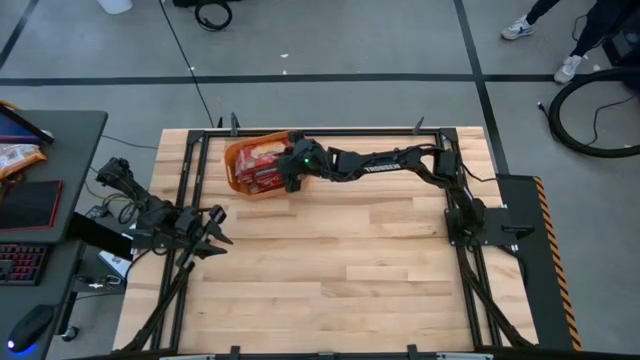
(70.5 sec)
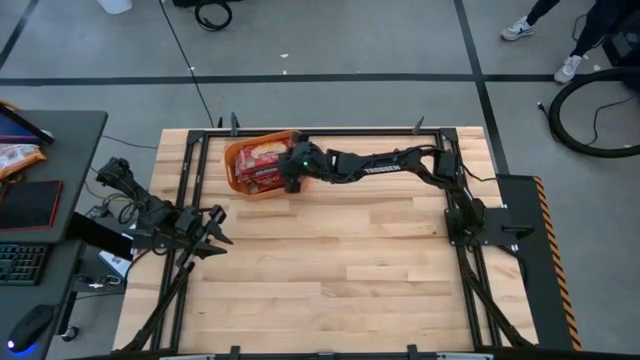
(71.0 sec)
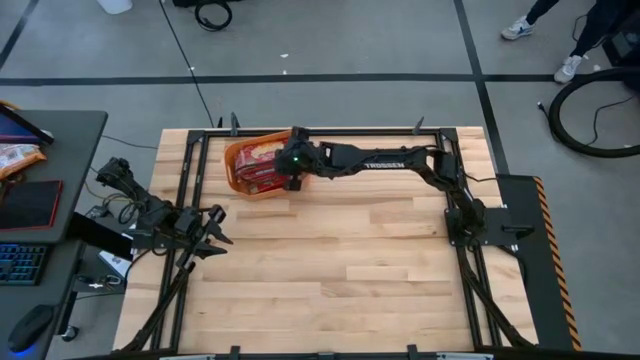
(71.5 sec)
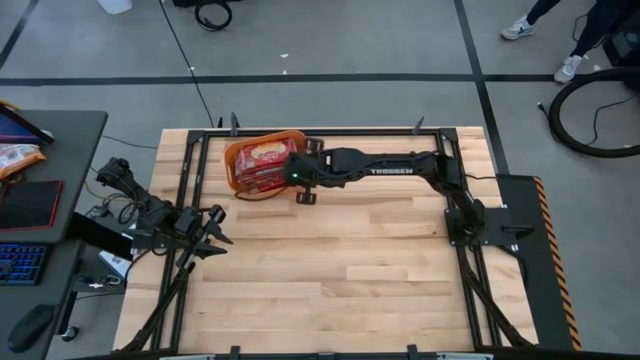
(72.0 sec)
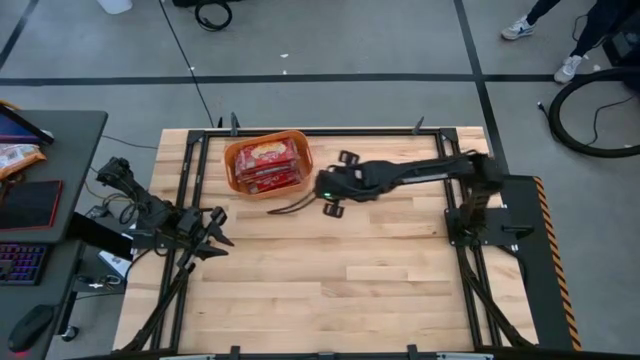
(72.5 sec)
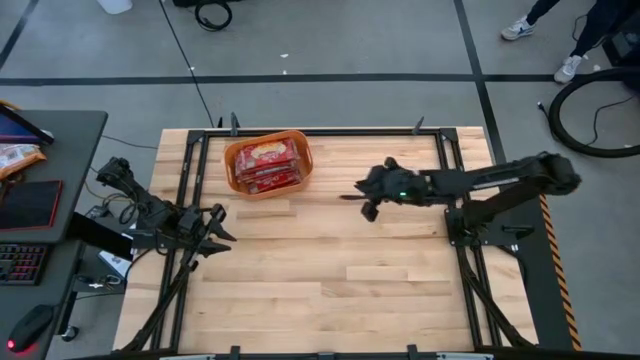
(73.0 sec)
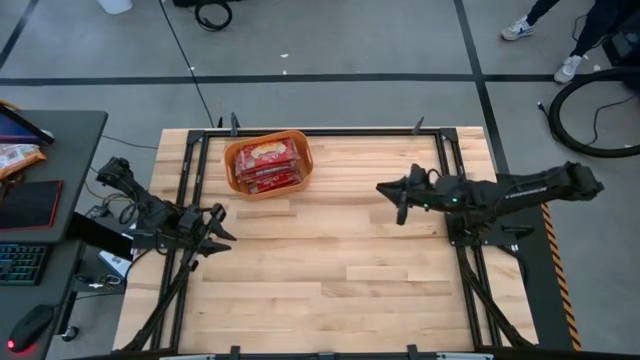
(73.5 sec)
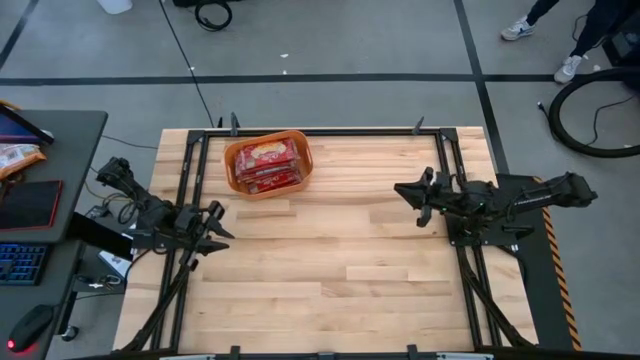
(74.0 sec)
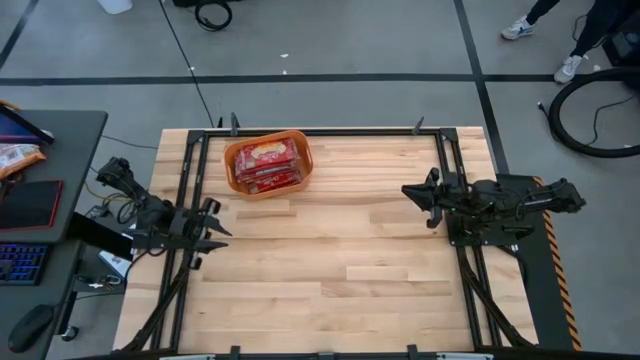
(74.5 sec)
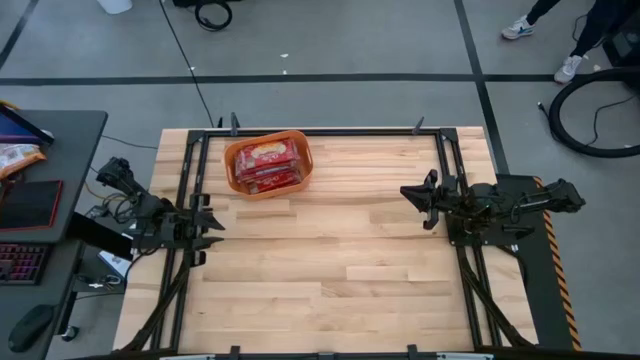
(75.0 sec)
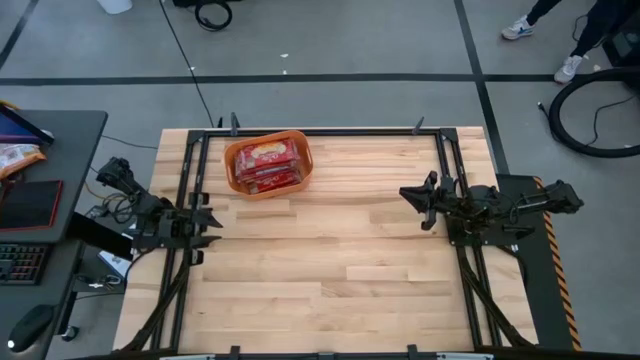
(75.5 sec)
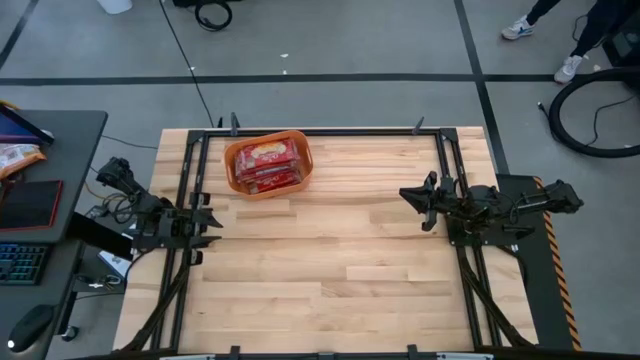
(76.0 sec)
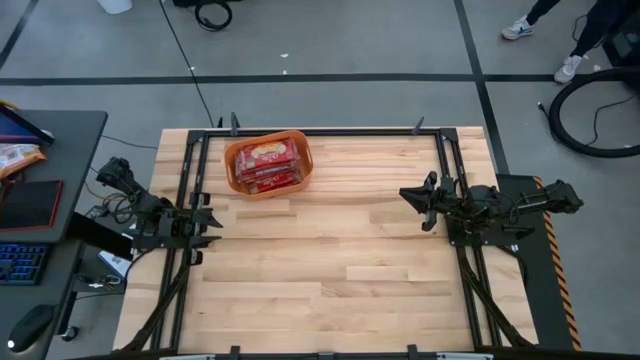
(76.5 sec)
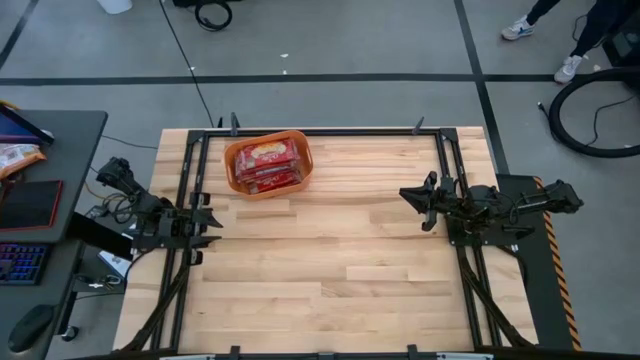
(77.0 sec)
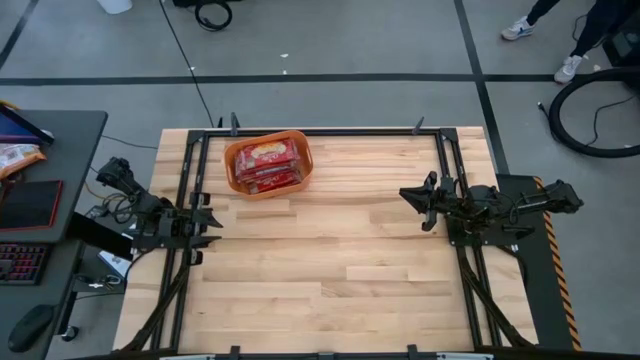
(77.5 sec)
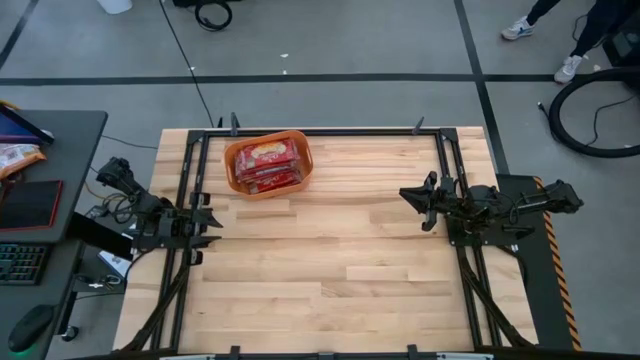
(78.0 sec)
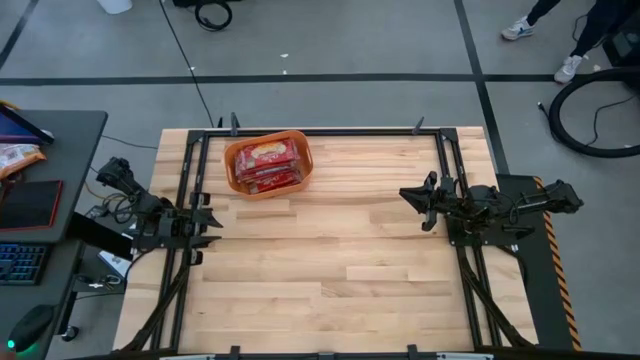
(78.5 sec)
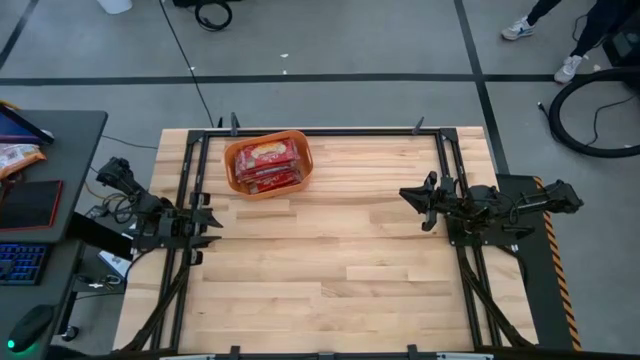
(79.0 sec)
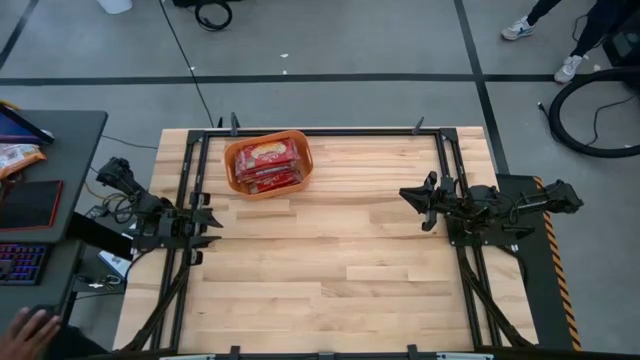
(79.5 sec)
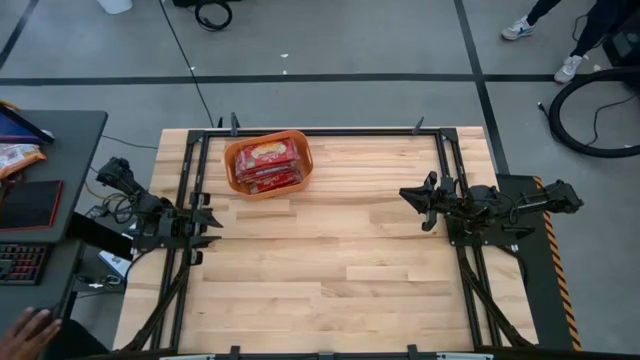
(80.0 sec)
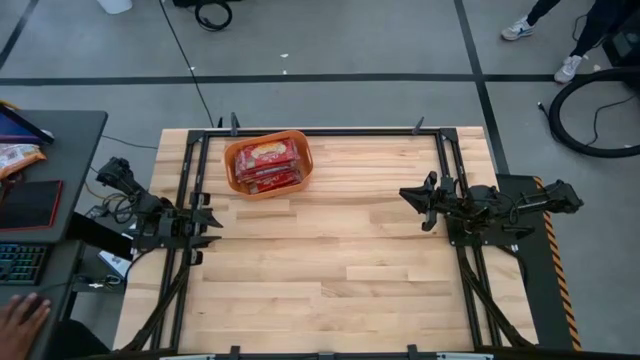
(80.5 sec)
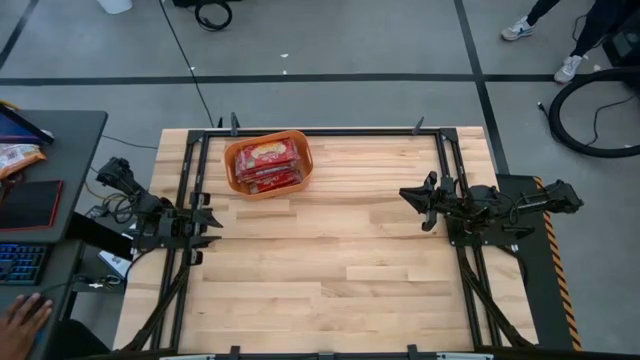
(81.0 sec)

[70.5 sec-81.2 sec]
Task: Sort popcorn bags into baskets
Return to Home Position

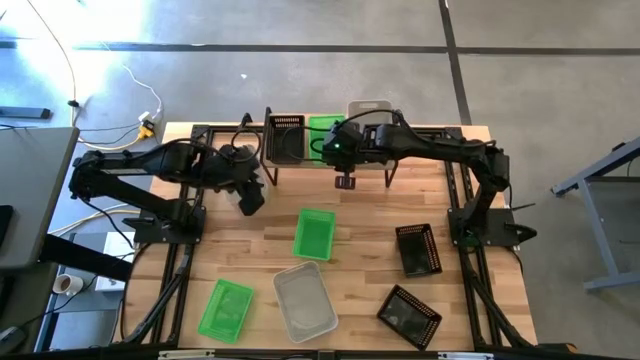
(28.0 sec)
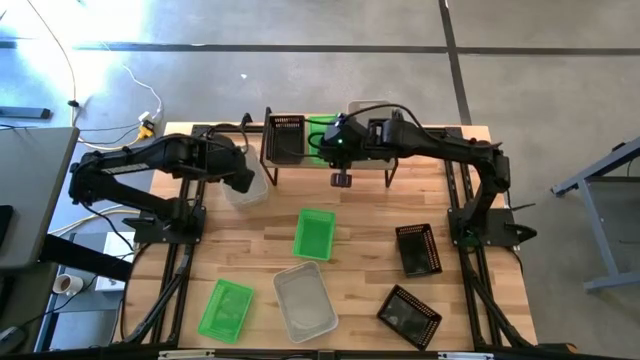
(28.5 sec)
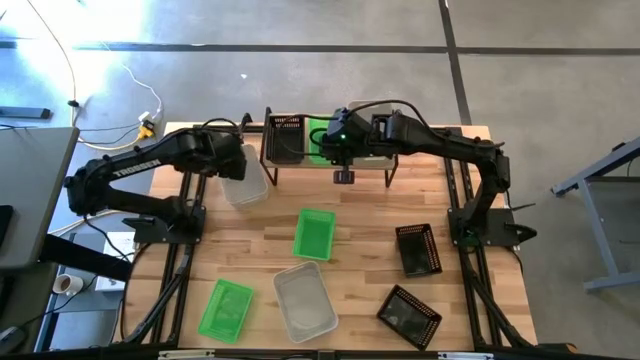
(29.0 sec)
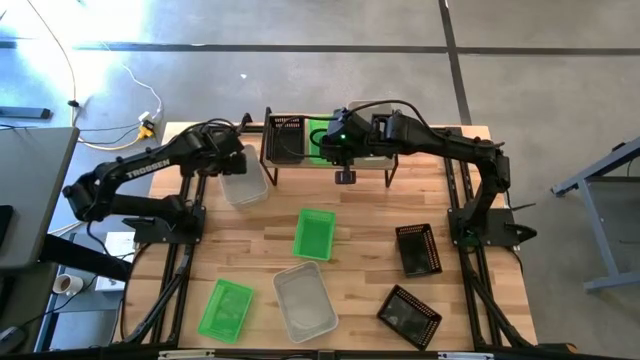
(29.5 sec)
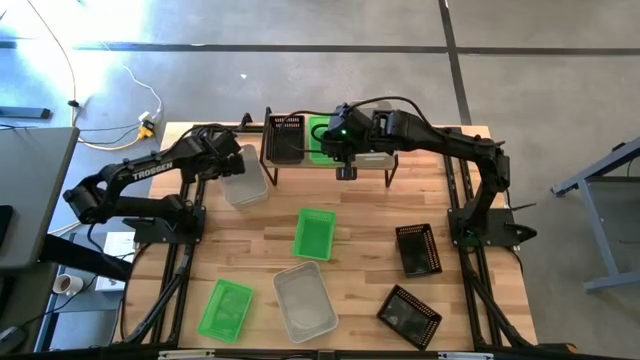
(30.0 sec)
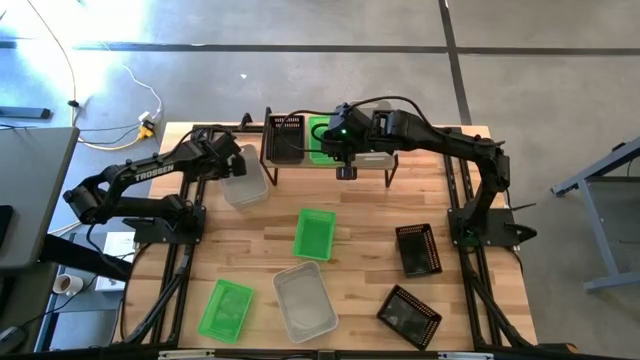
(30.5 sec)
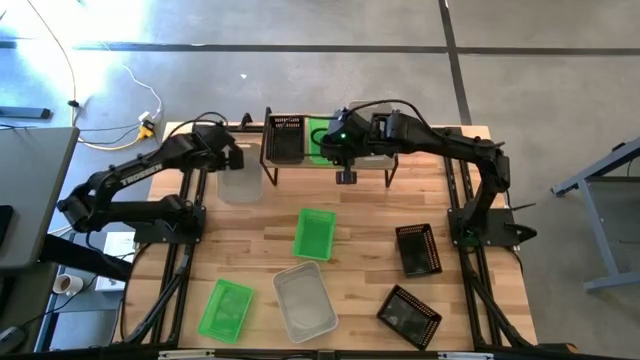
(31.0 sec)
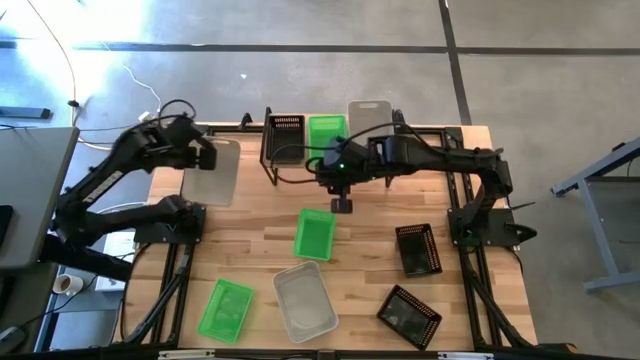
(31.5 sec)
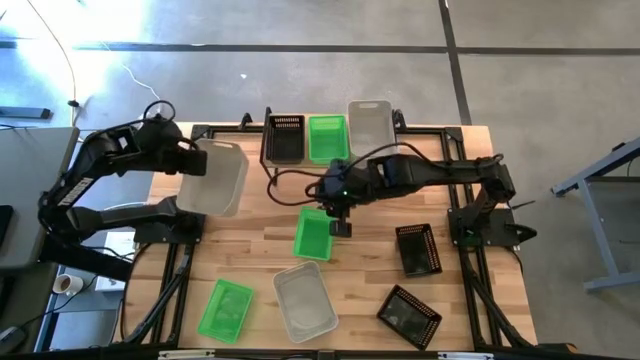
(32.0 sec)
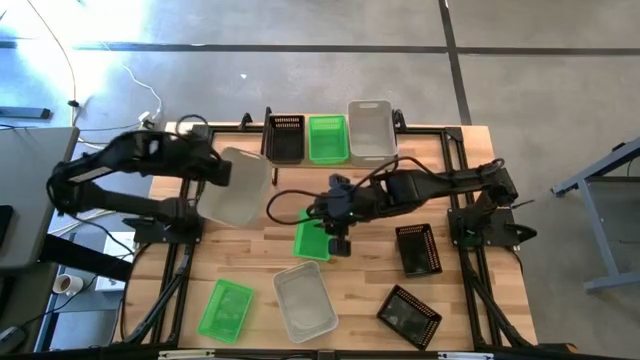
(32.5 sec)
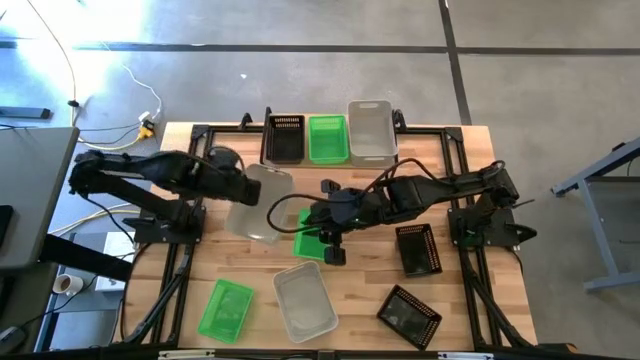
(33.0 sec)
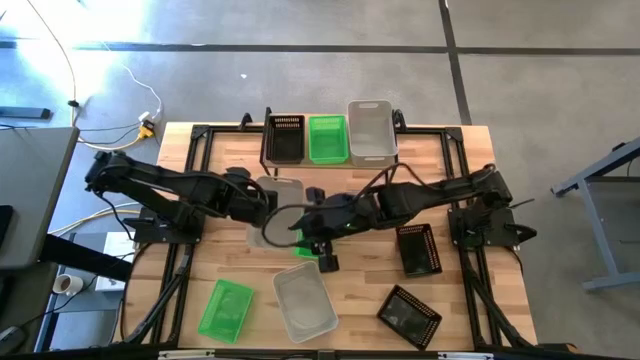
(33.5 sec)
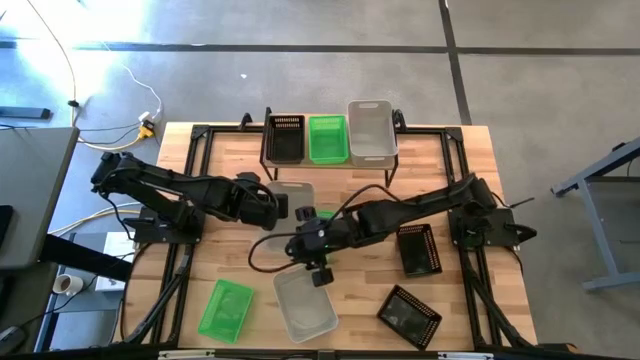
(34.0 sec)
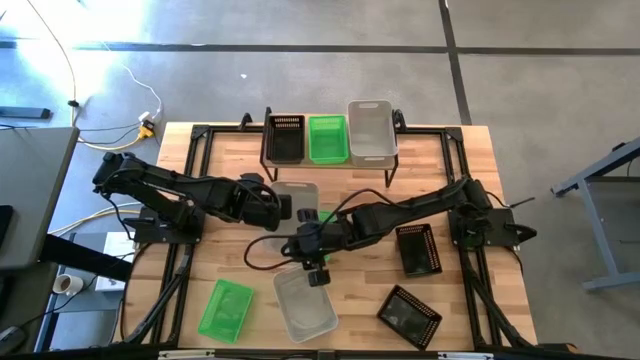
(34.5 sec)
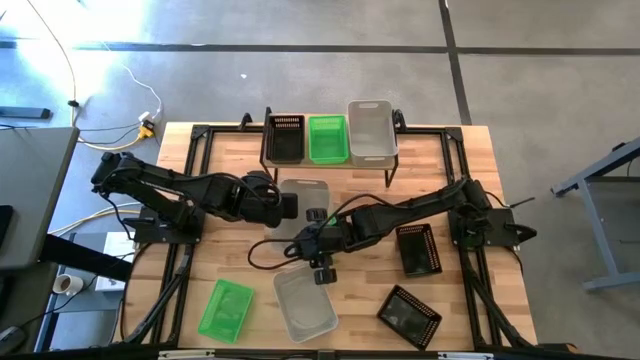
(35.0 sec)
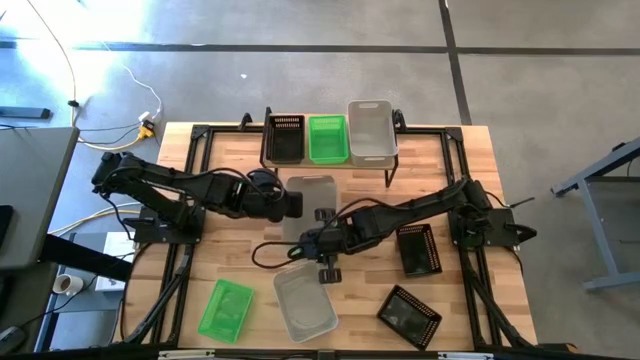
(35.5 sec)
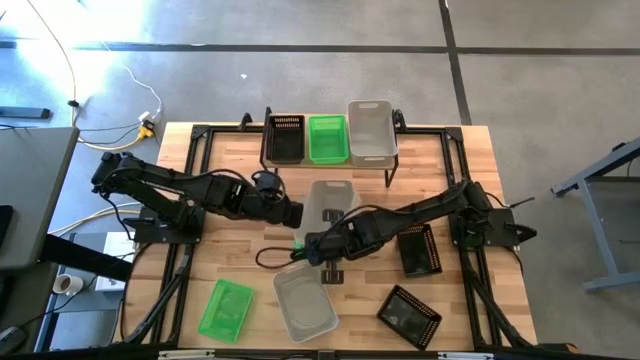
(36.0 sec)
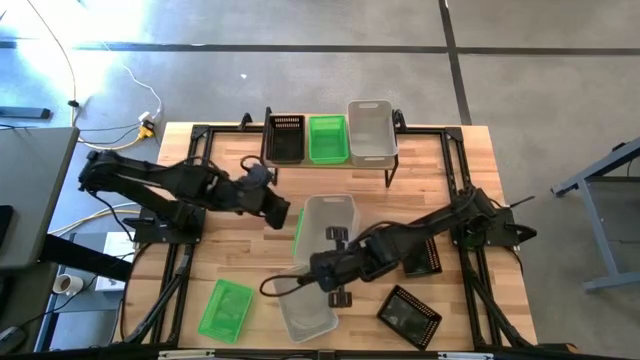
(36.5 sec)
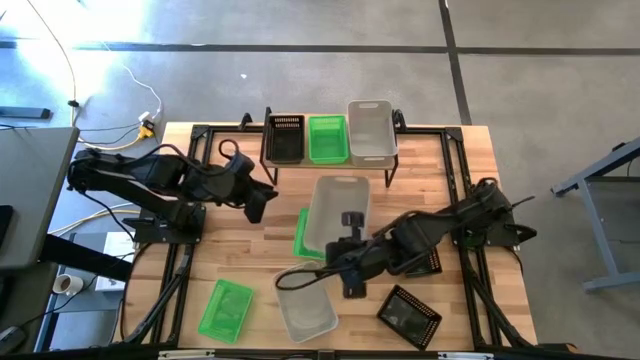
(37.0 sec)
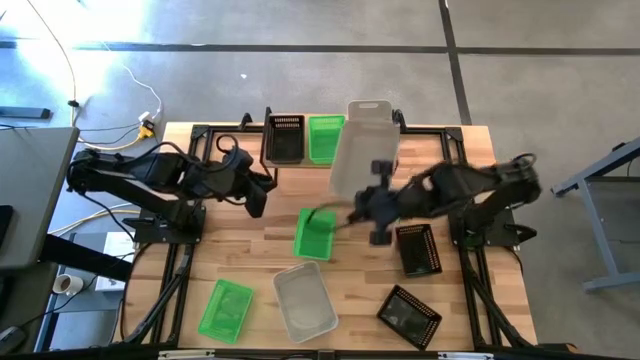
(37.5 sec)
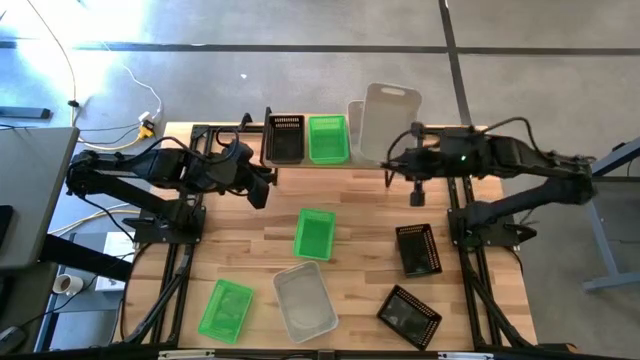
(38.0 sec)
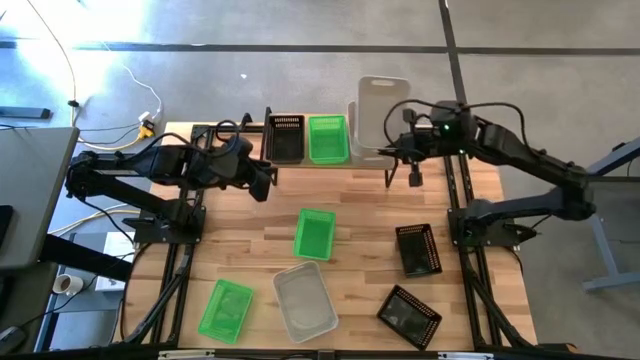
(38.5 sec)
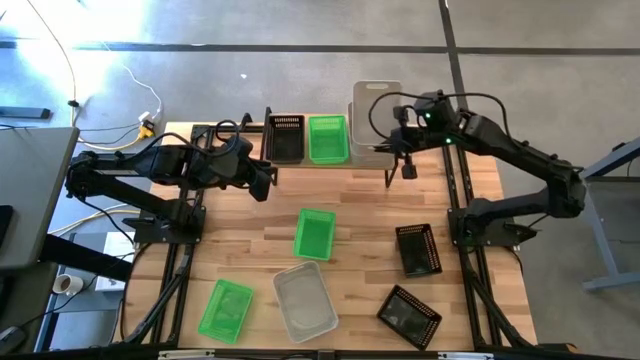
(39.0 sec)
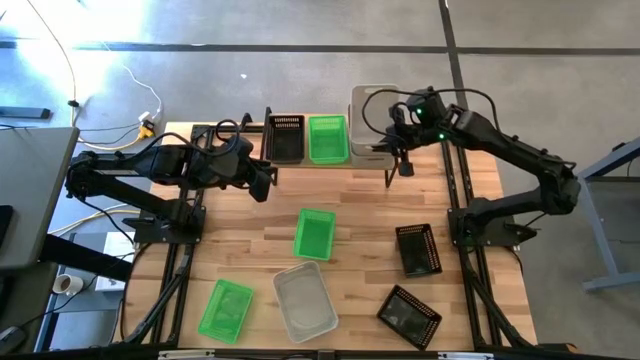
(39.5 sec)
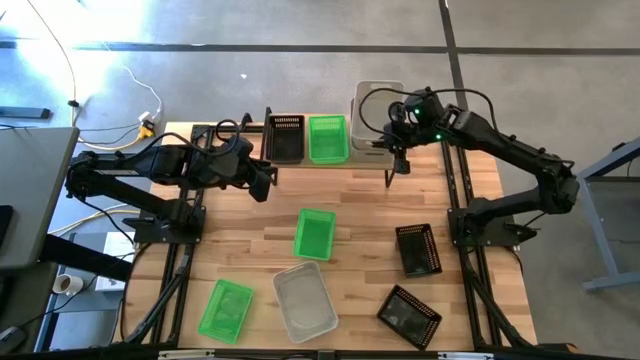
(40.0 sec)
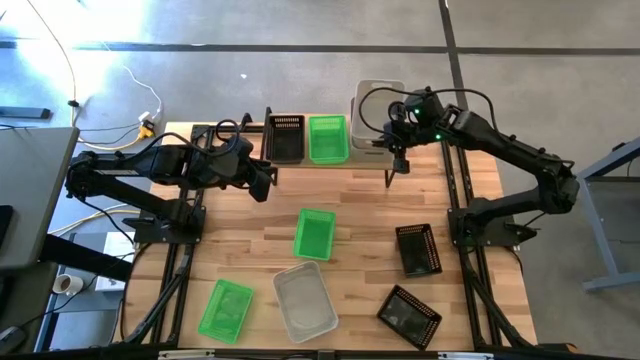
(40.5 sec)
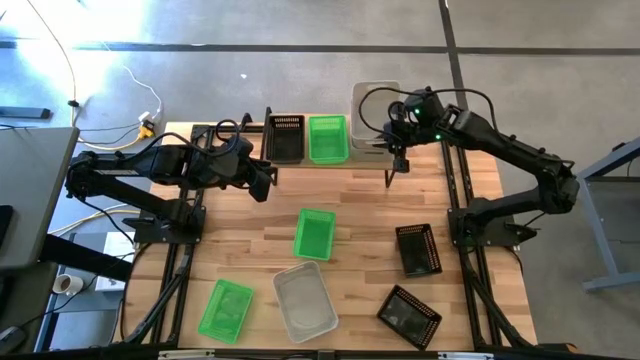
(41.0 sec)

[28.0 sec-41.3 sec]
Task: Stack baskets on shelf by color
Stack the top gray bin on top of the gray bin on the shelf
